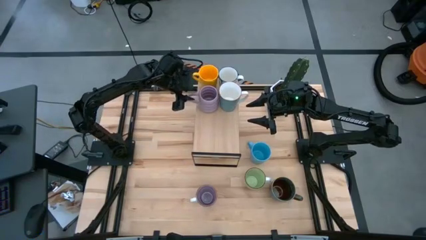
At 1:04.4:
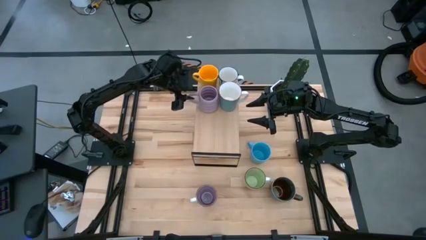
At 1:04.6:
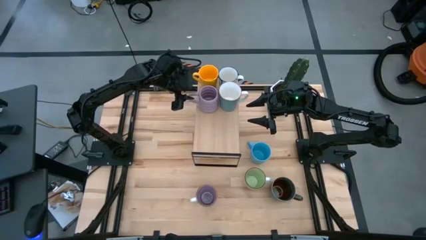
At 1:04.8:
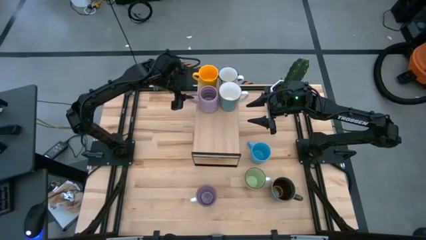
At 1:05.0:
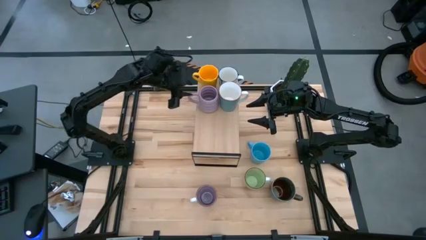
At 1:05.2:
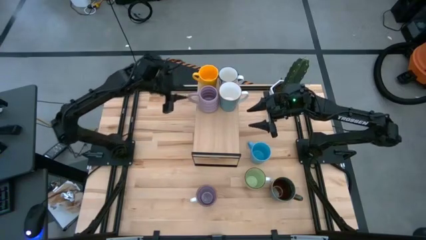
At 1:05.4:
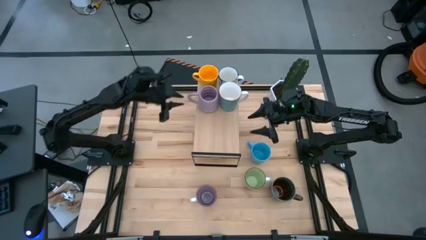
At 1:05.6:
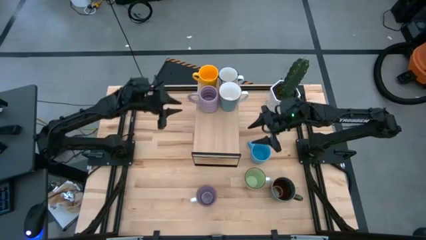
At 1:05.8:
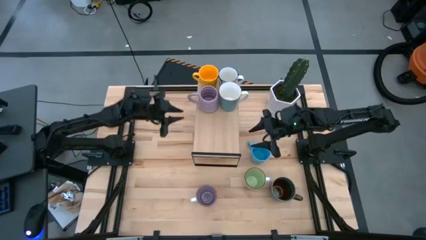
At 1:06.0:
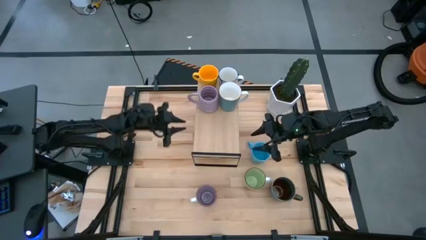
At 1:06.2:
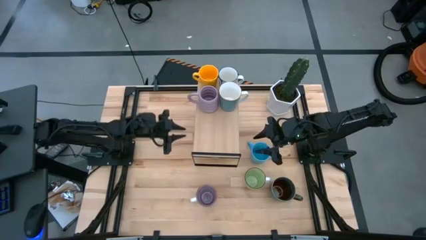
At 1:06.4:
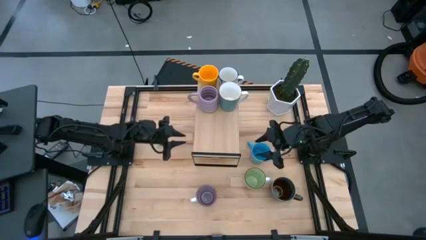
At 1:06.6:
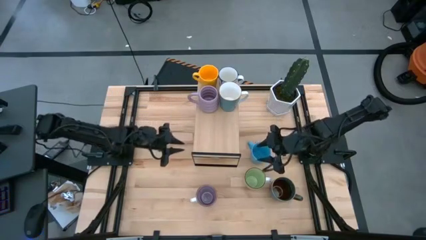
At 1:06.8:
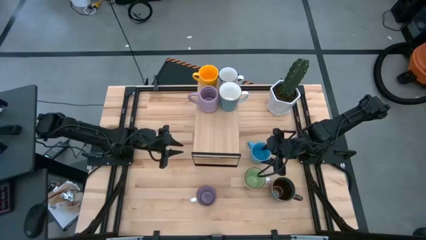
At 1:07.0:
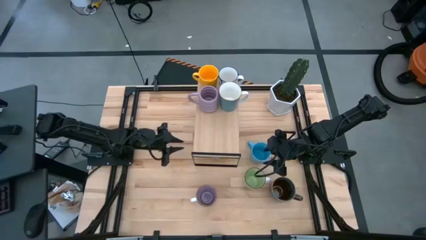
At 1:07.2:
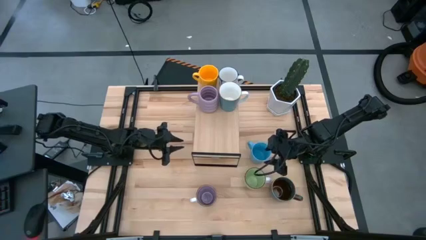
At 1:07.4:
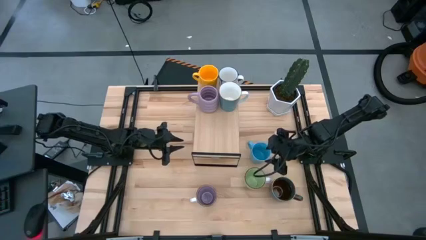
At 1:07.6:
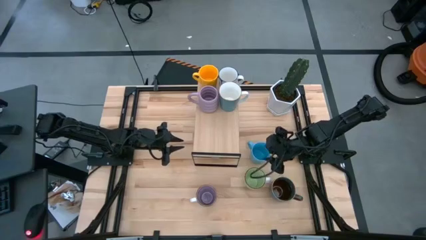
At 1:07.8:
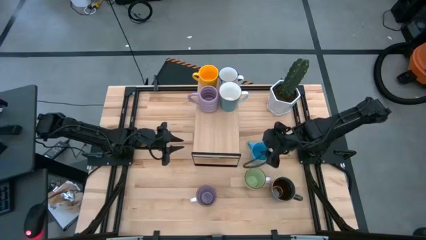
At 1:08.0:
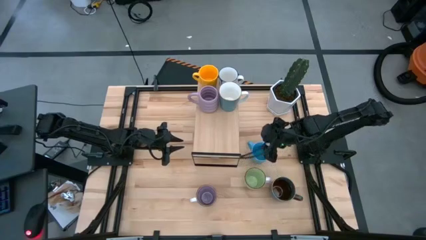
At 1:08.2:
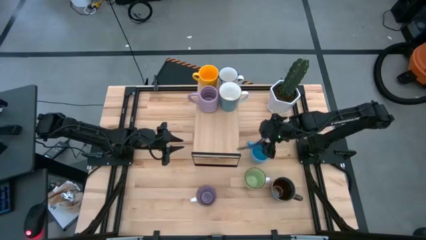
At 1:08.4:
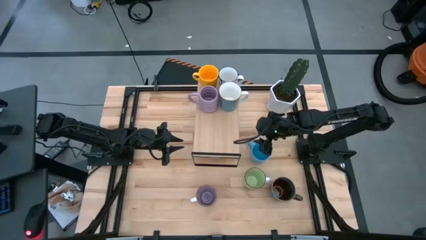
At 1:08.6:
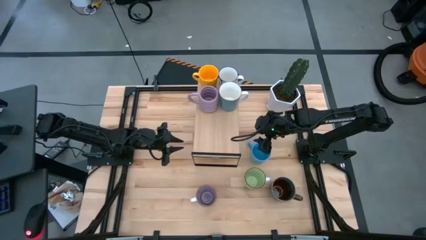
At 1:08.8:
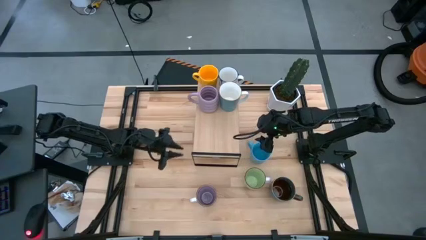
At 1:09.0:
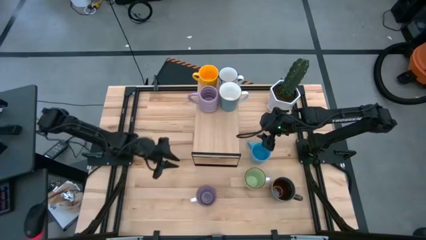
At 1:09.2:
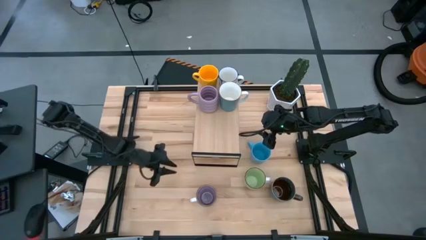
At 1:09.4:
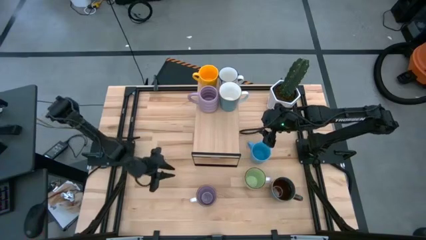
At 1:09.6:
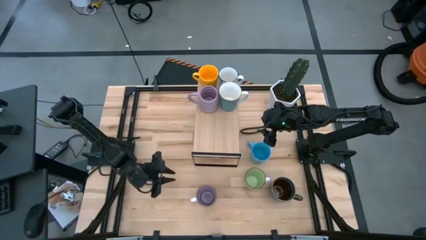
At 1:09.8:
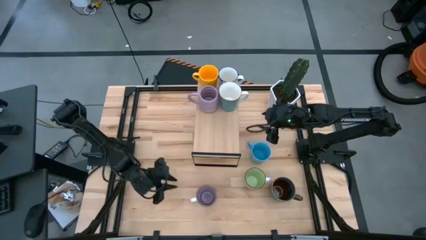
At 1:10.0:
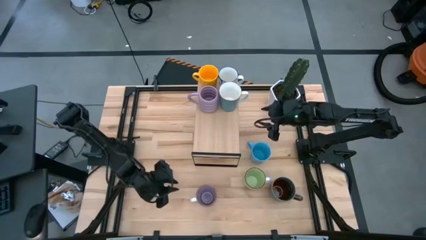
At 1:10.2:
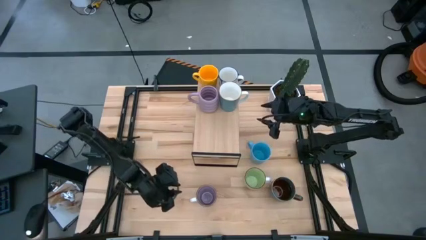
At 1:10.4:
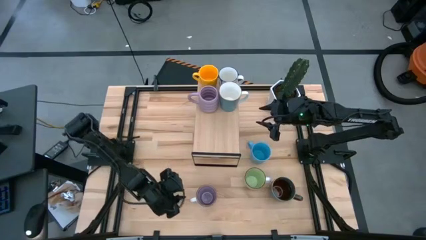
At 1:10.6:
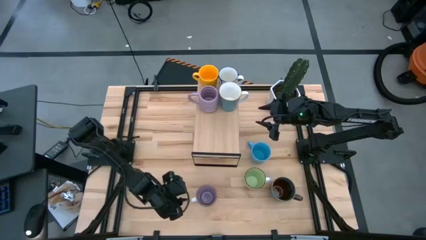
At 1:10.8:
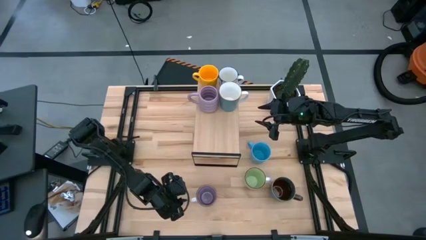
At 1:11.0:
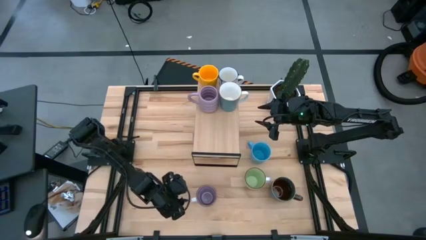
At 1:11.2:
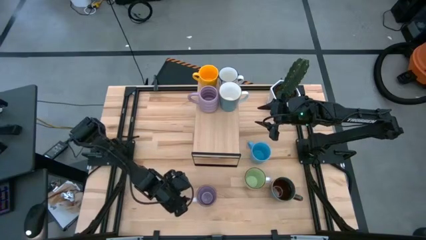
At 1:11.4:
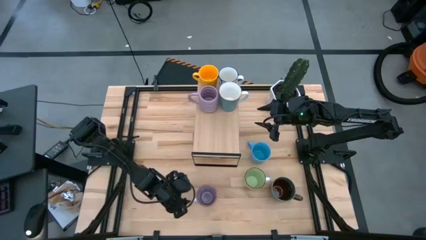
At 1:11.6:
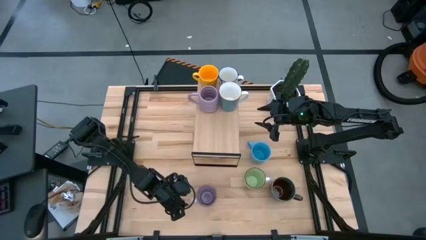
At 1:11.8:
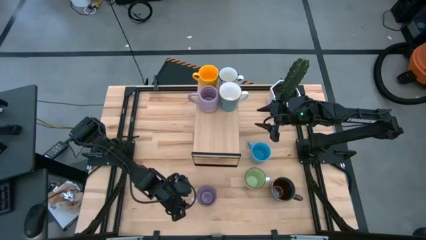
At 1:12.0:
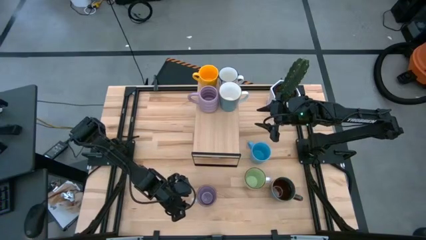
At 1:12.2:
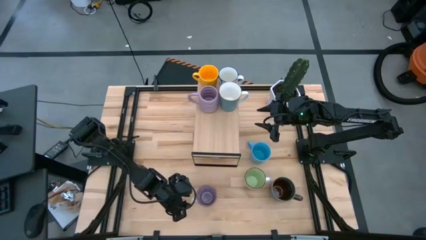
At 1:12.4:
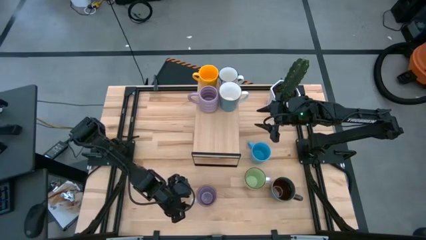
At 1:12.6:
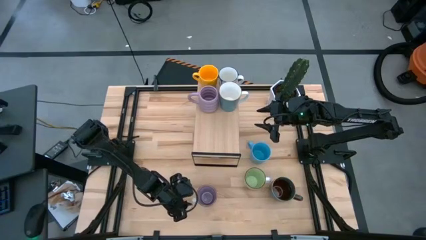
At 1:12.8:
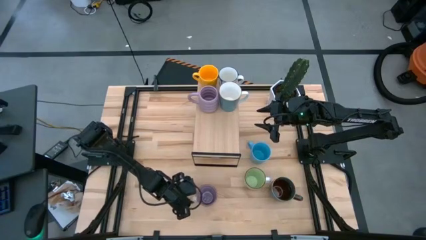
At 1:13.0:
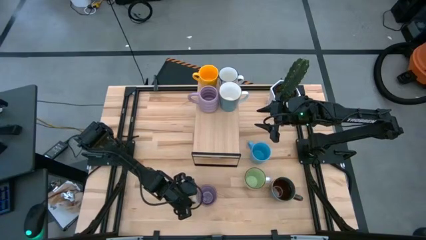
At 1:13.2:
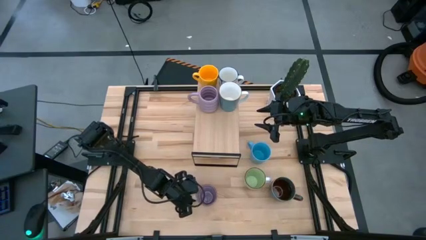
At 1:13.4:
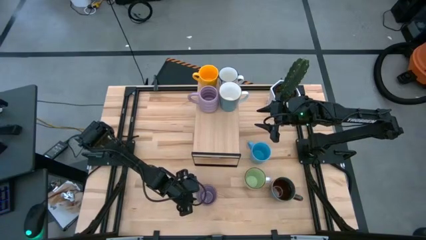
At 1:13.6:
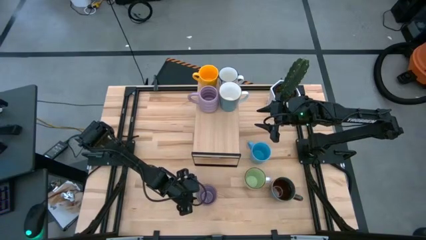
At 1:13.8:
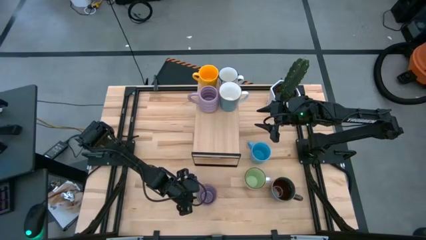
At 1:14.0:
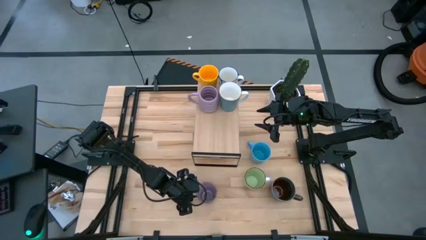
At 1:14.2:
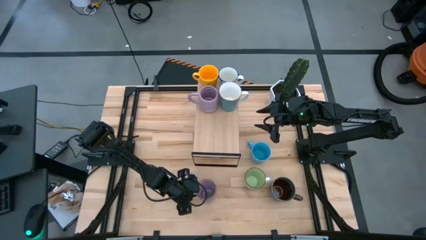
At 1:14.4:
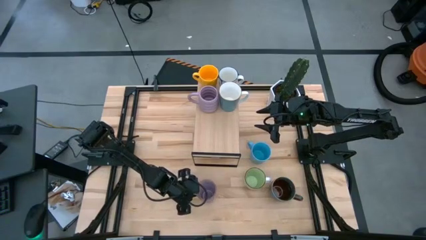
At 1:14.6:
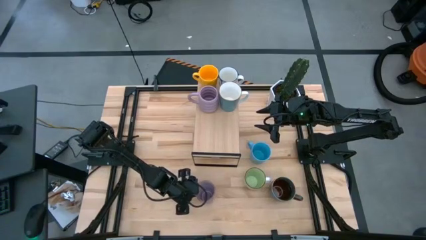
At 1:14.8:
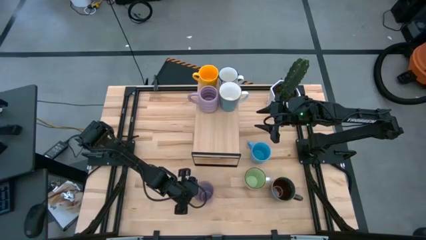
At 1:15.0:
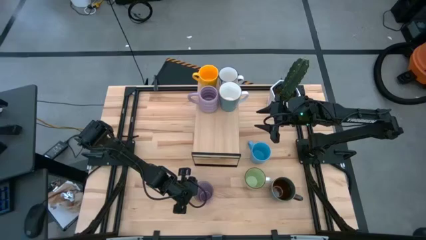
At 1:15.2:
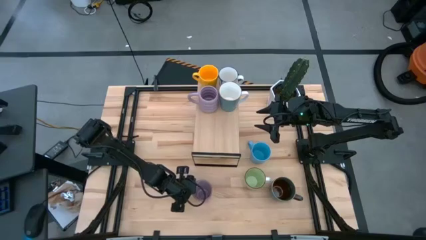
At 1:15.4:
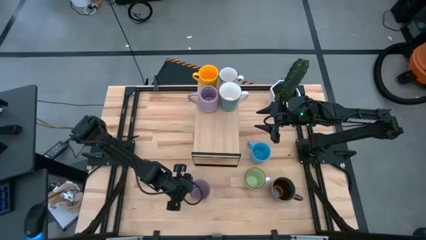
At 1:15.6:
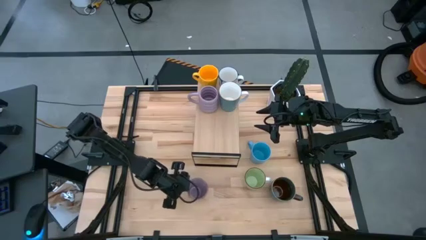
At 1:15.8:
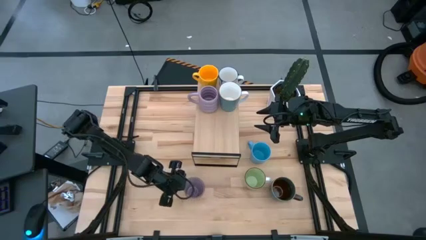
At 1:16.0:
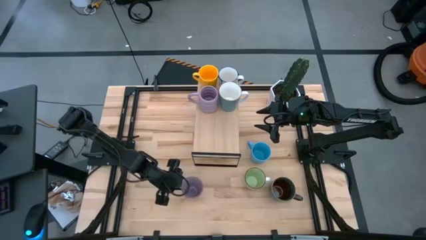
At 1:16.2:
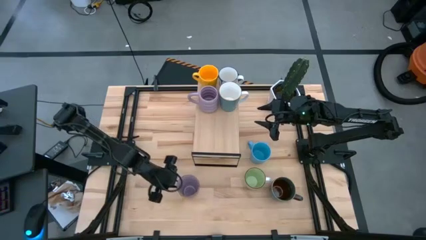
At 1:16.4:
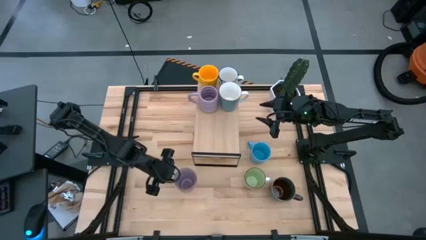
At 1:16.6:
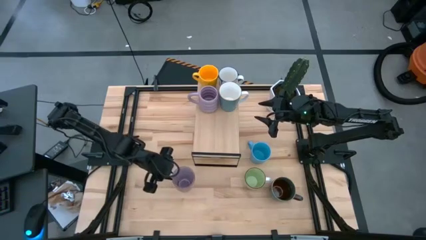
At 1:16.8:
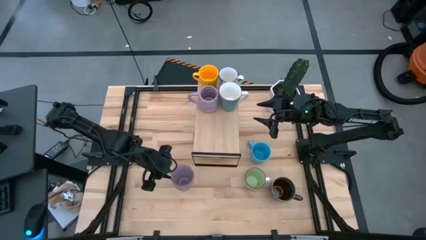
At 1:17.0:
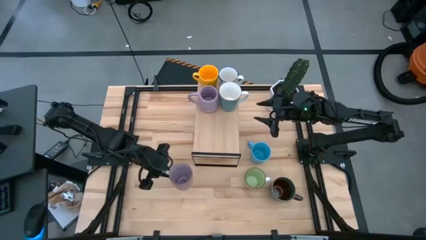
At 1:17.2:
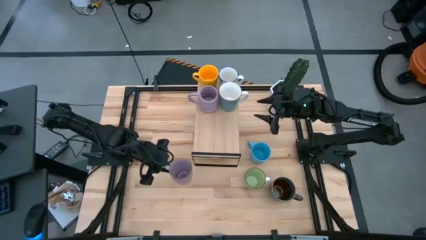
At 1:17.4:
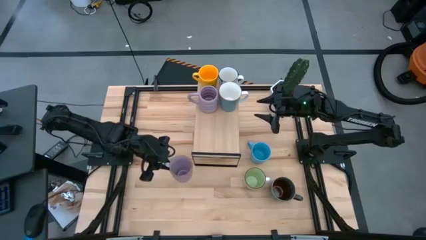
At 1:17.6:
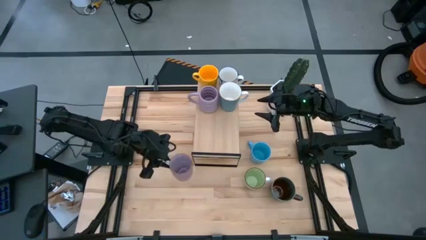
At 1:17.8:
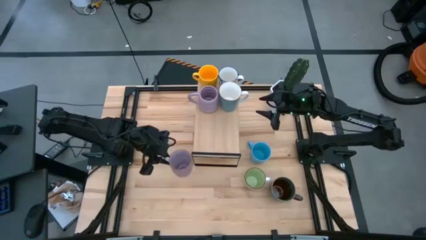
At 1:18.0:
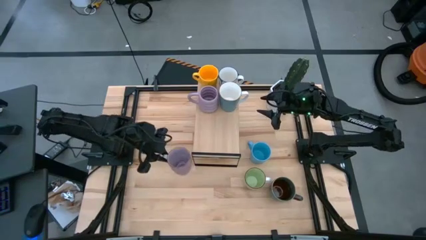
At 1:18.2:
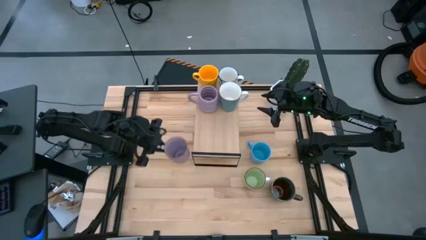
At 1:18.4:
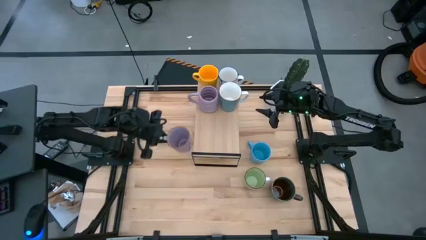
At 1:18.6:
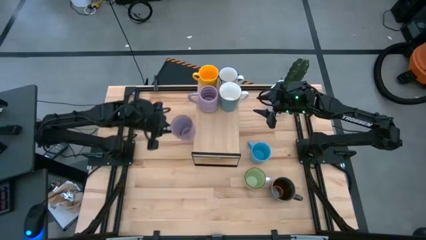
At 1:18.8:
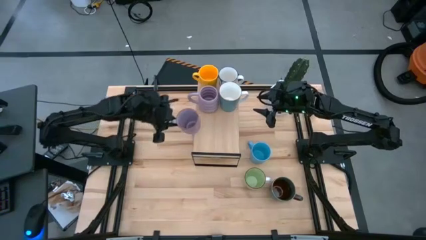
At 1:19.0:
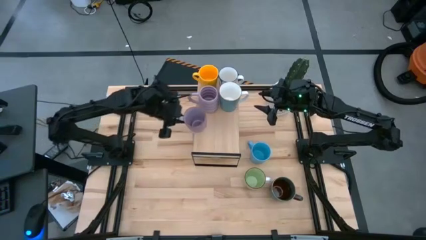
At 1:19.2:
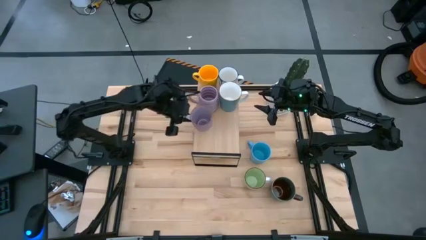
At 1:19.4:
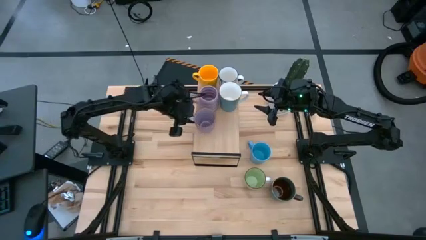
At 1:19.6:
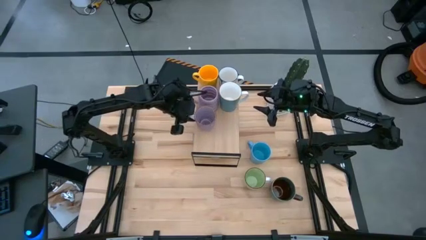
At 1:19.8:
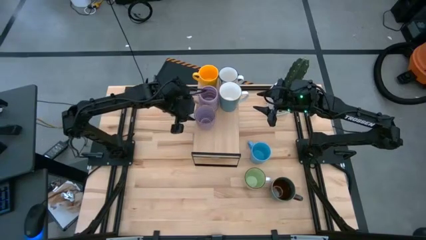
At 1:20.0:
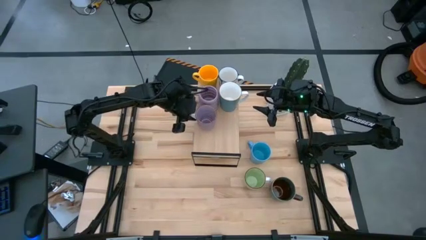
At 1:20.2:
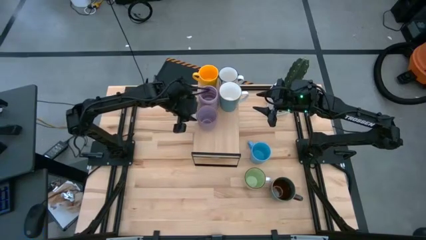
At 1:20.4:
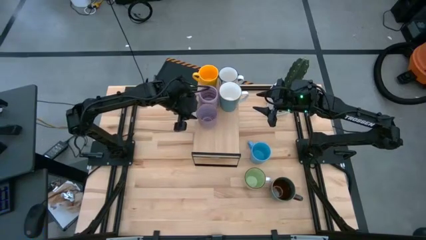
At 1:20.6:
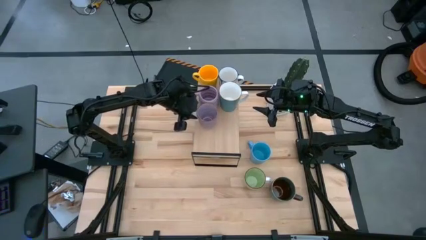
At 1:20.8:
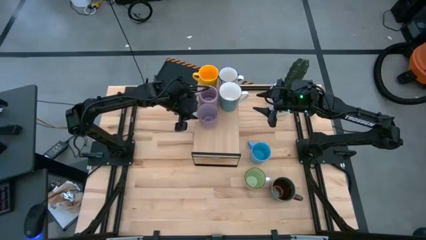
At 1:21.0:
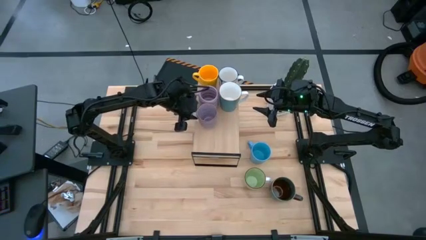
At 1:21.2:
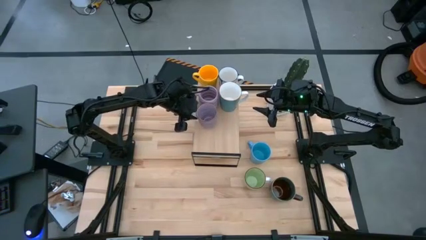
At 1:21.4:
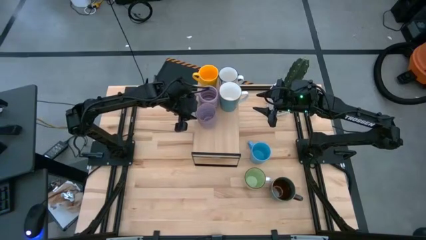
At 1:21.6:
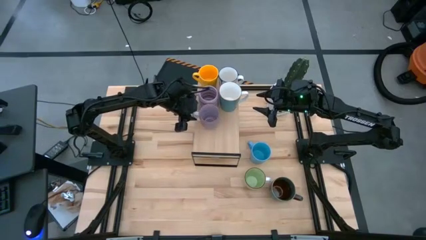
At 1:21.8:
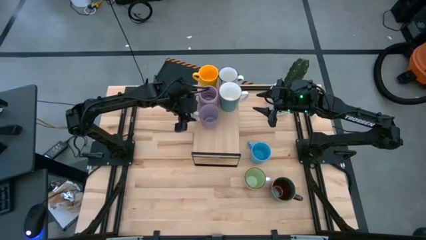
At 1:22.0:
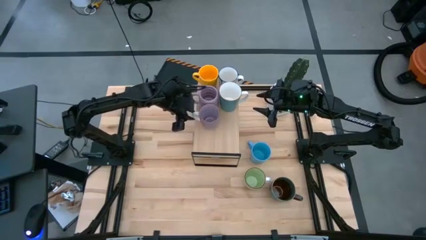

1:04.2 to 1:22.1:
Task: Place coffee mugs
Put the purple mug on the shelf aligned with the other purple mug
